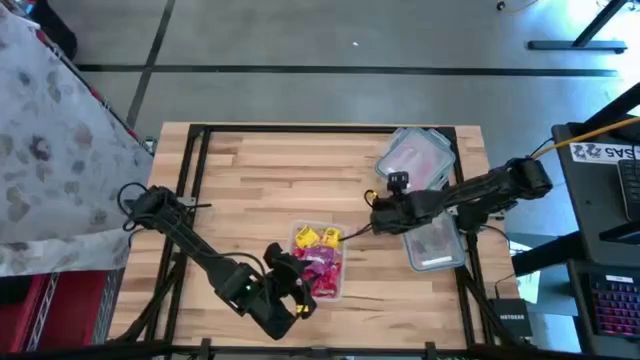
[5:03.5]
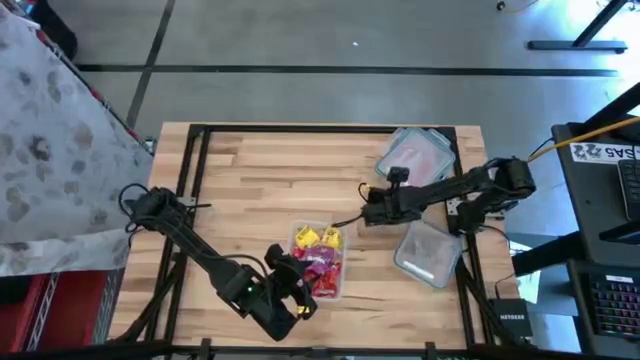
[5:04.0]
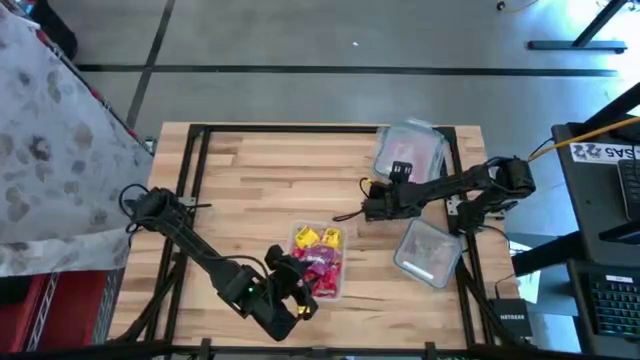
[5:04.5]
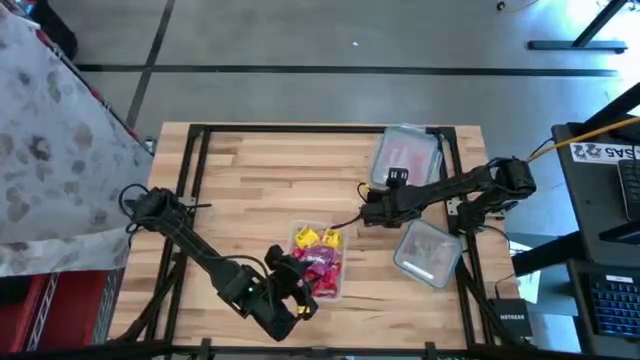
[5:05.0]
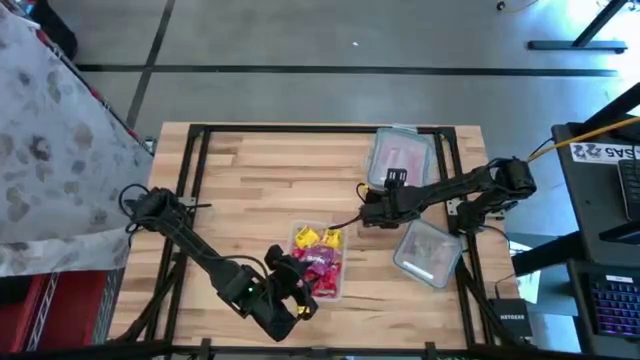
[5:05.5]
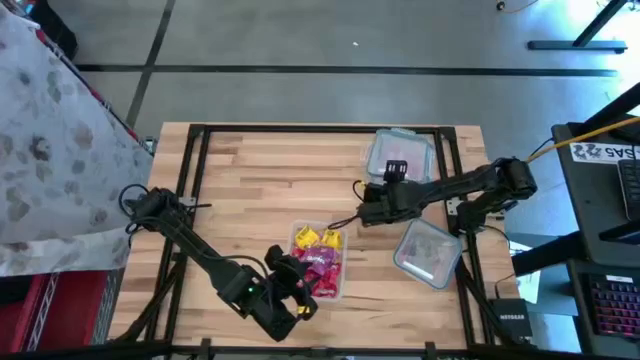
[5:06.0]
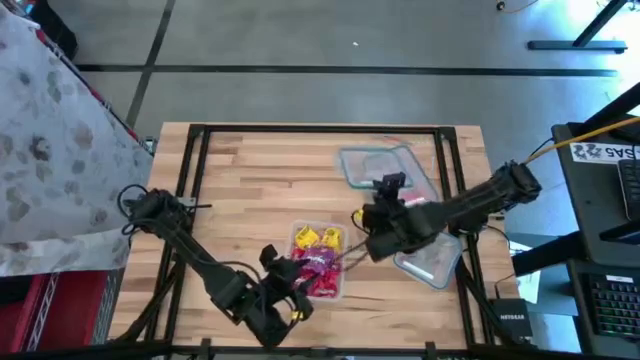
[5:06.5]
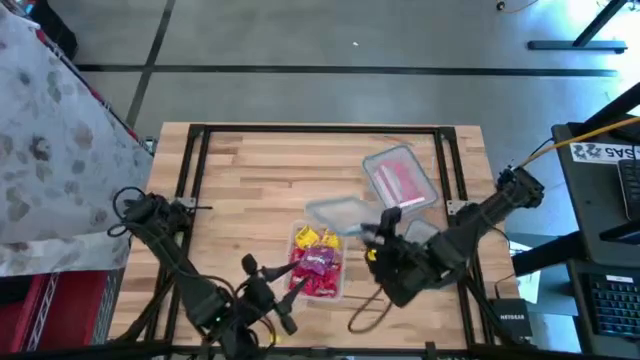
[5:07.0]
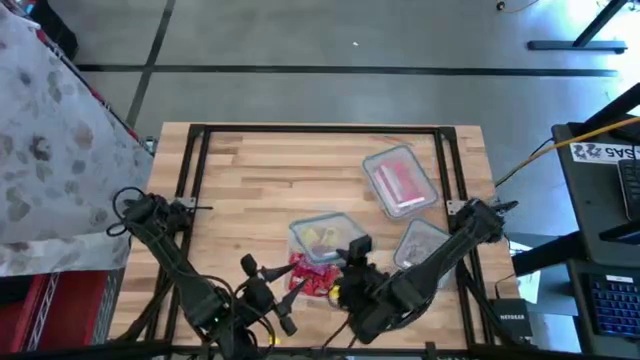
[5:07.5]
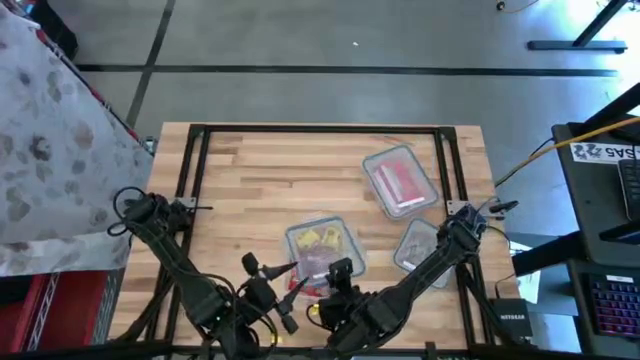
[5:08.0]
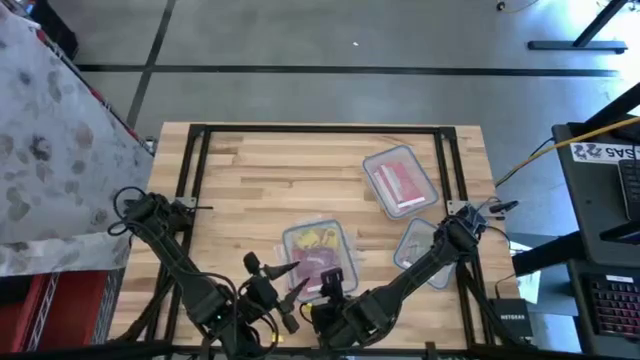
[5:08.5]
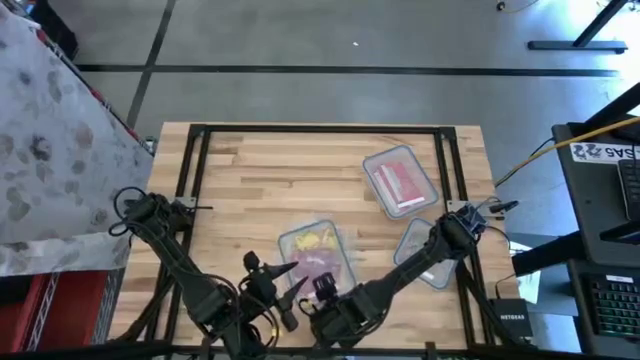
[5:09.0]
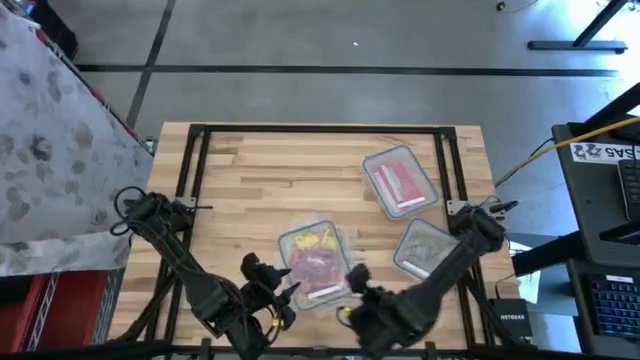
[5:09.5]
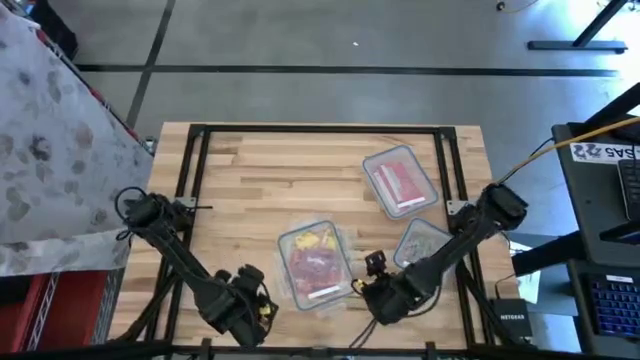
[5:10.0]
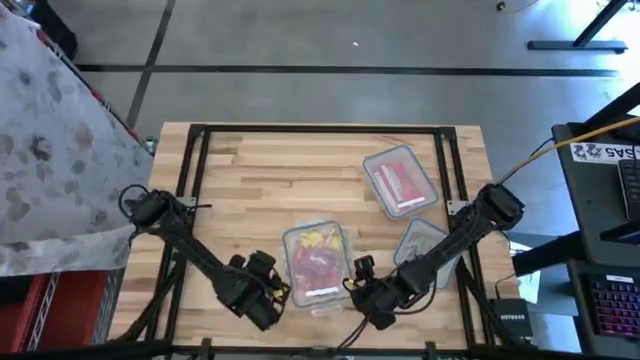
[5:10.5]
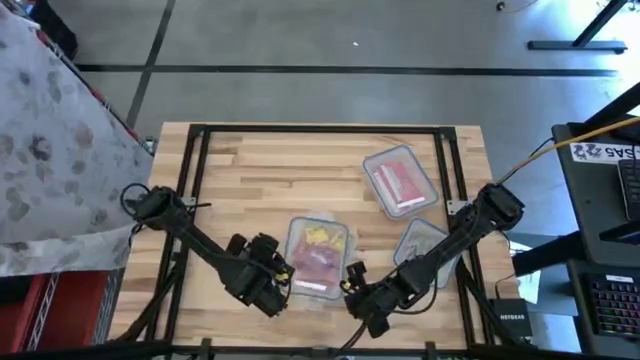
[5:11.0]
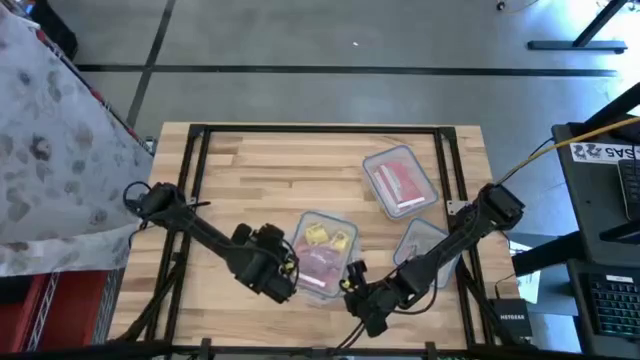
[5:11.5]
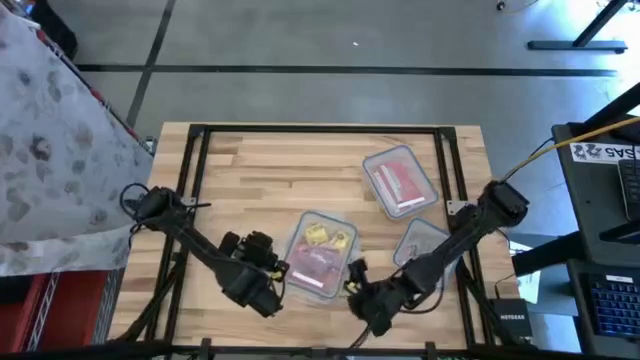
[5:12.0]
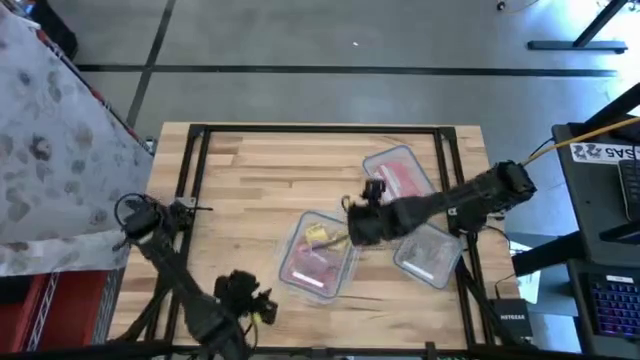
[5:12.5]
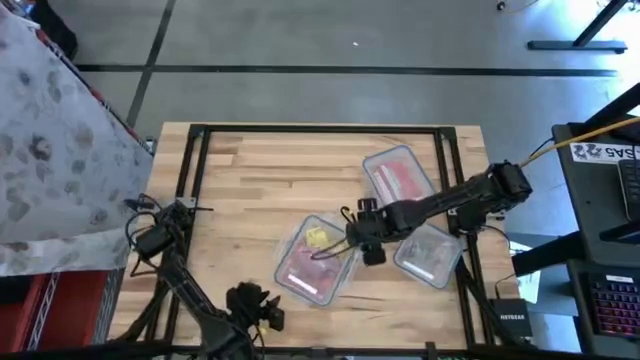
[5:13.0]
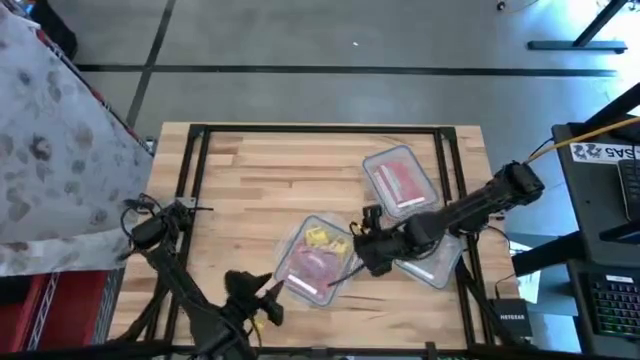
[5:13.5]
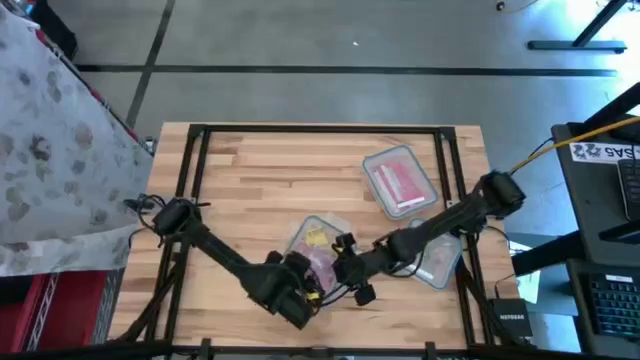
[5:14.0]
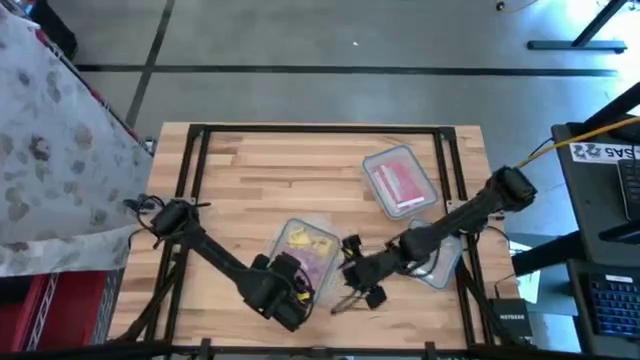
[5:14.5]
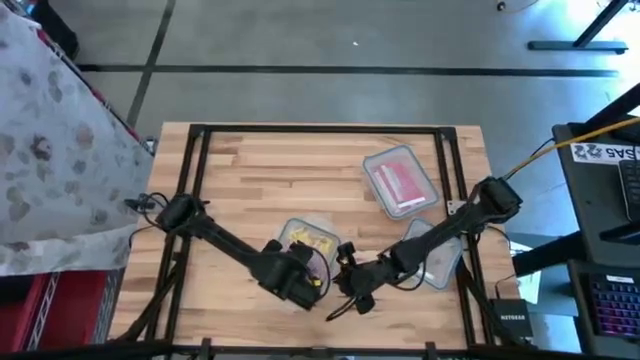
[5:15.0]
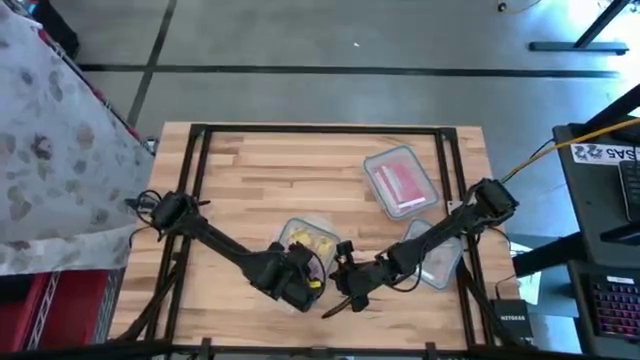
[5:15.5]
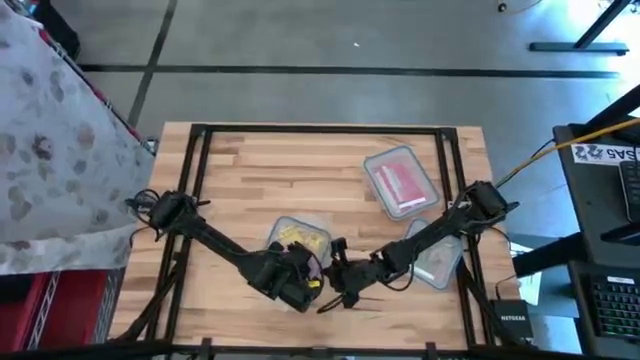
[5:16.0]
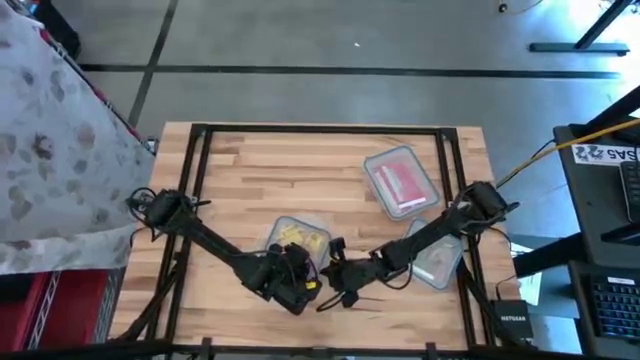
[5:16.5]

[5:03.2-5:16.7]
Task: Sort candy
Close the rectangular transparent food container

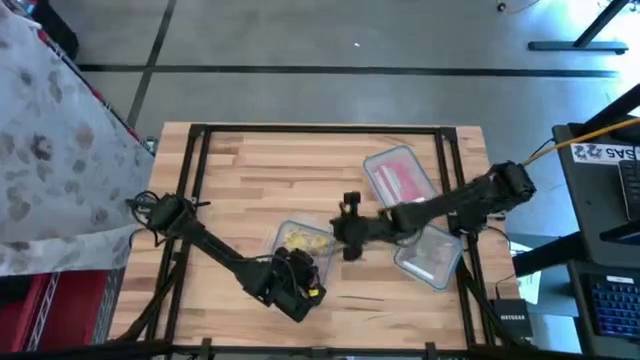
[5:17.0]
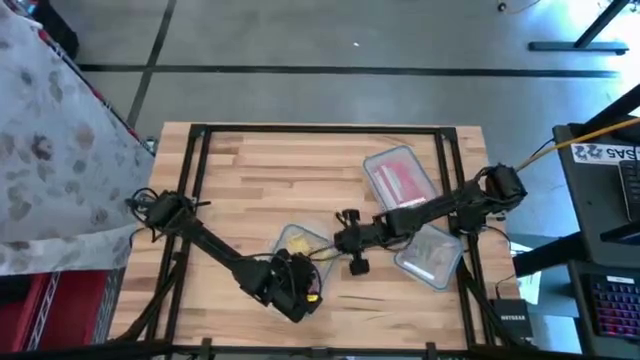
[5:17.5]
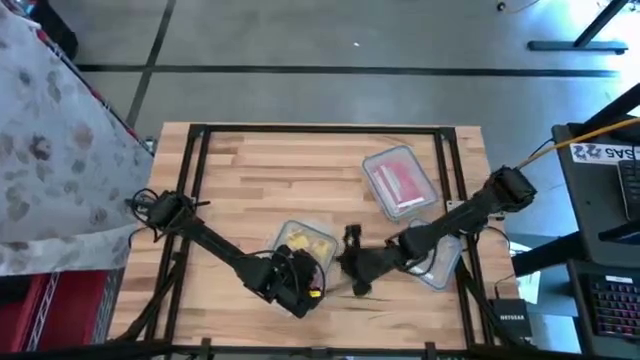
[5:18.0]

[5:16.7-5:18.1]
Close the rectangular transparent food container

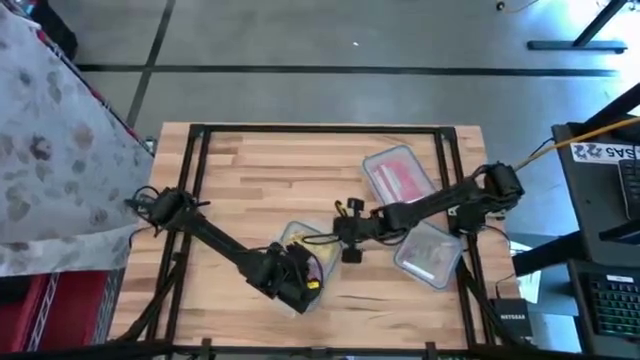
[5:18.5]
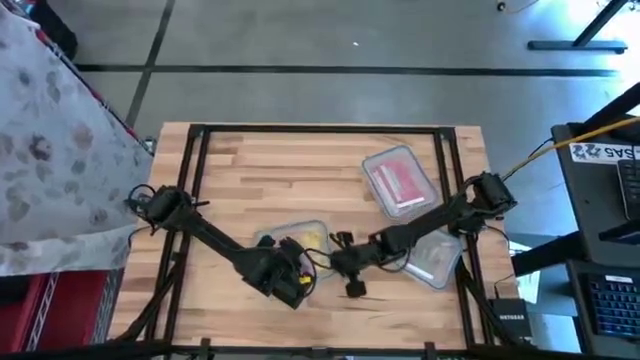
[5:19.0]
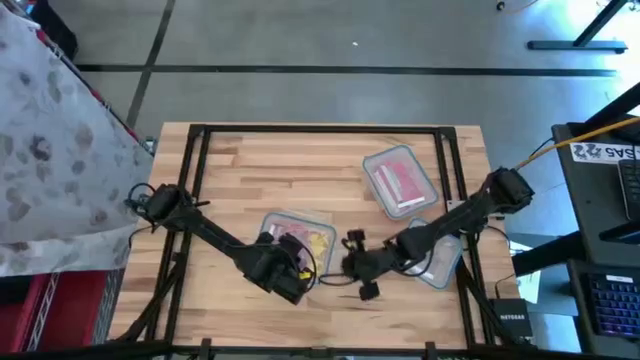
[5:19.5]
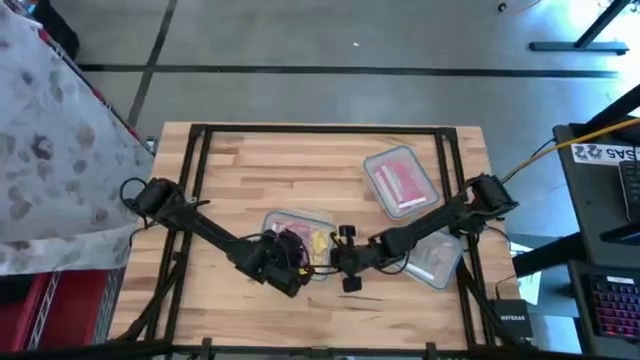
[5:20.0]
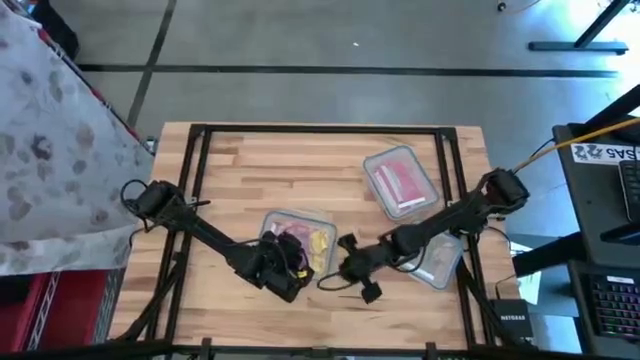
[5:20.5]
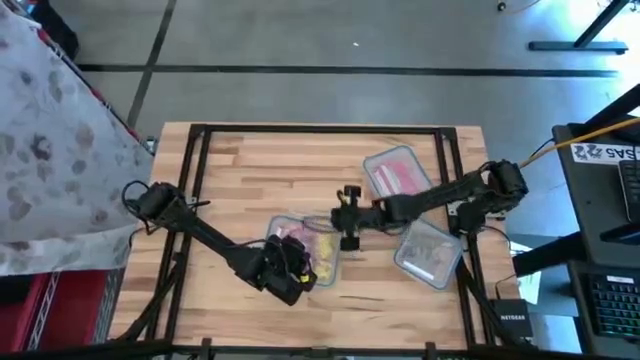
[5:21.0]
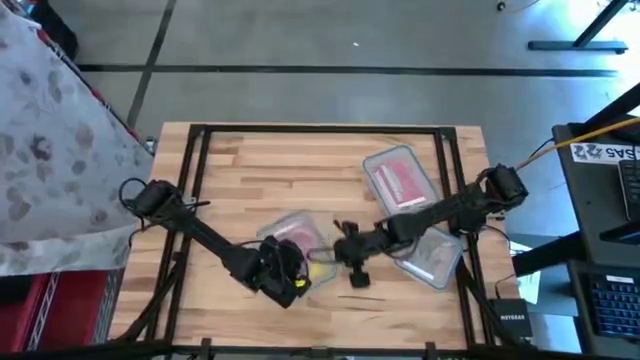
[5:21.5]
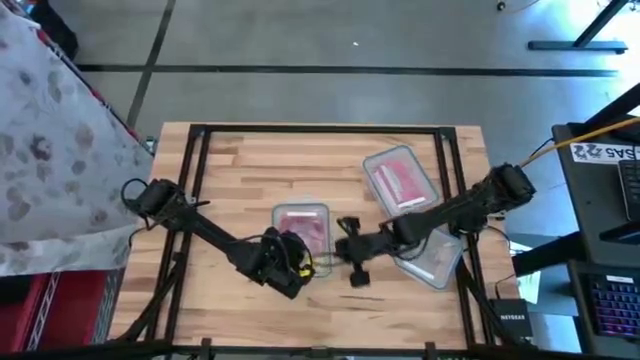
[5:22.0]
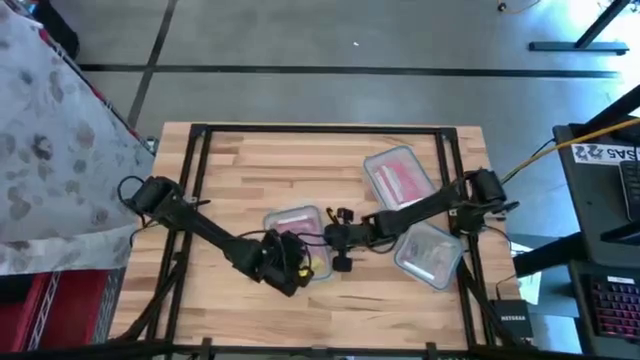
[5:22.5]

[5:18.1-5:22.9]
Close the rectangular transparent food container

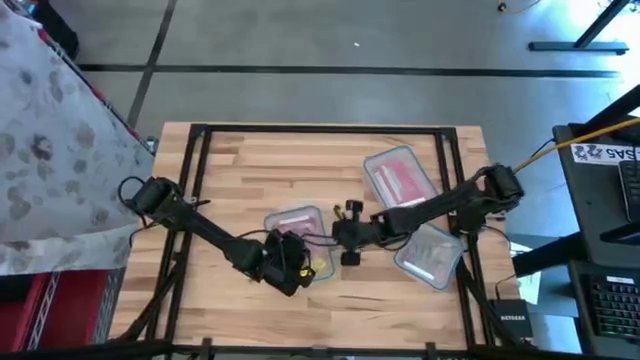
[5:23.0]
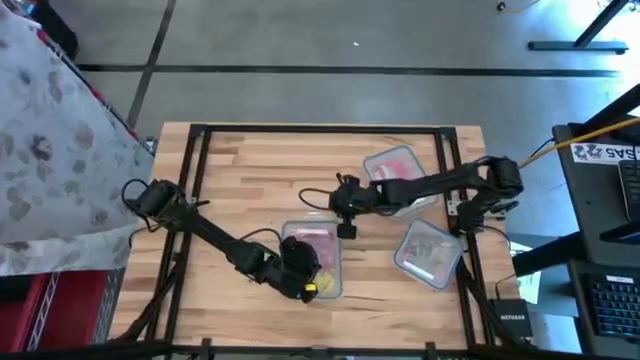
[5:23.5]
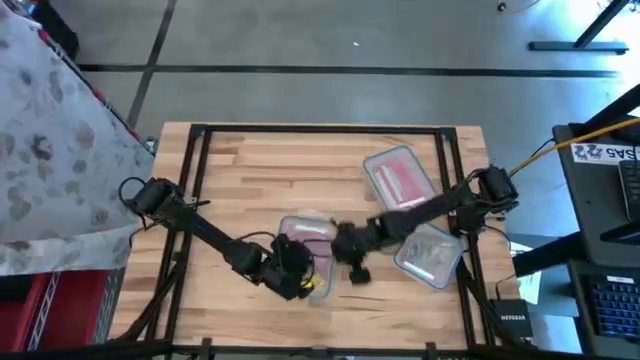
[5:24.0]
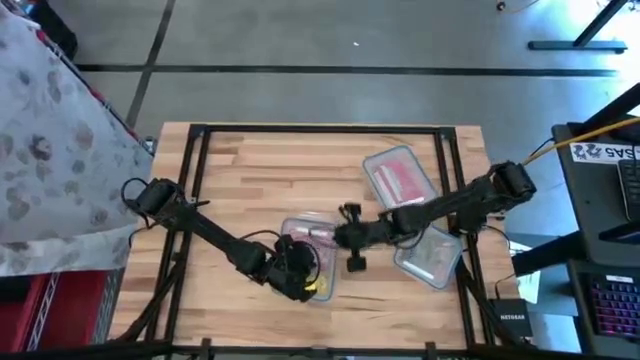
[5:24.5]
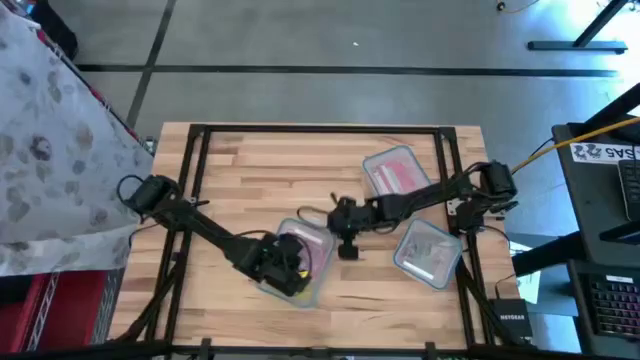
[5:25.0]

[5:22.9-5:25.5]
Close the rectangular transparent food container
